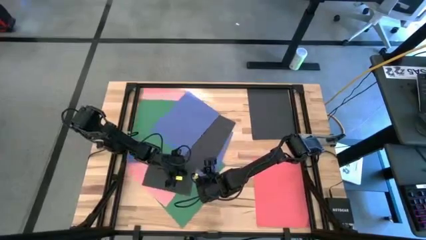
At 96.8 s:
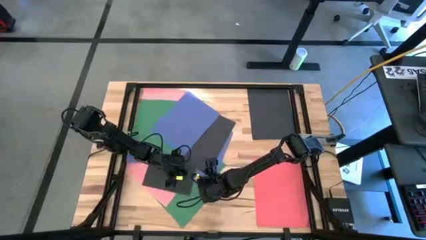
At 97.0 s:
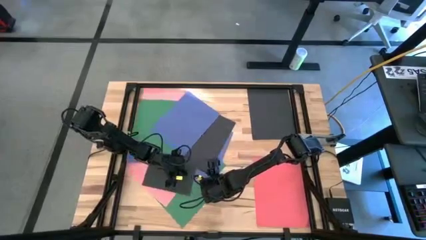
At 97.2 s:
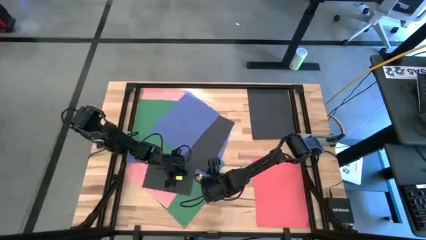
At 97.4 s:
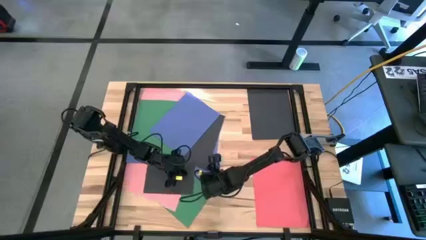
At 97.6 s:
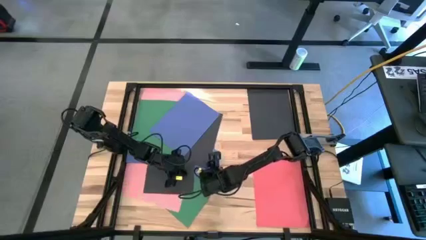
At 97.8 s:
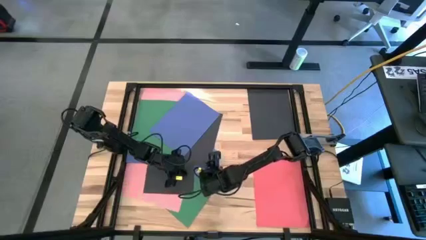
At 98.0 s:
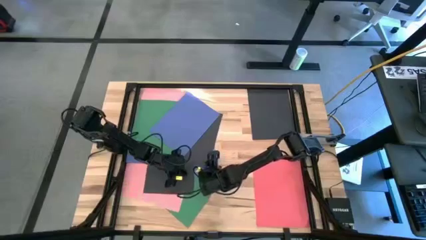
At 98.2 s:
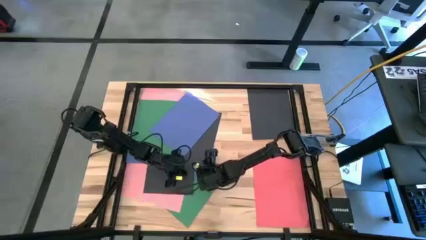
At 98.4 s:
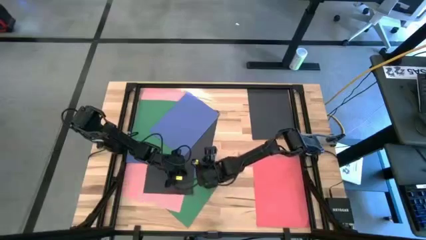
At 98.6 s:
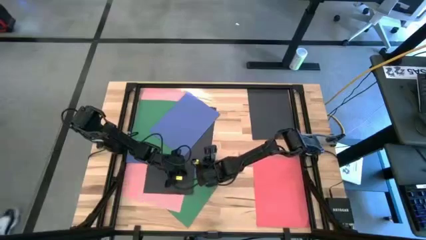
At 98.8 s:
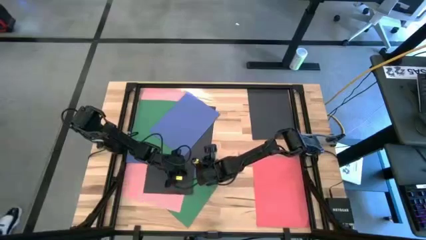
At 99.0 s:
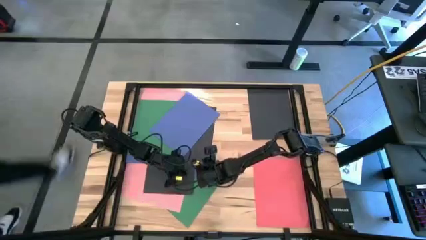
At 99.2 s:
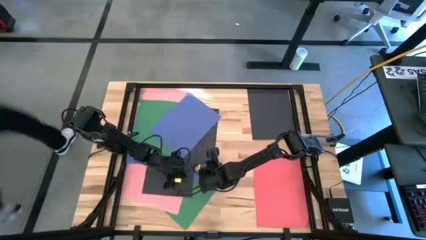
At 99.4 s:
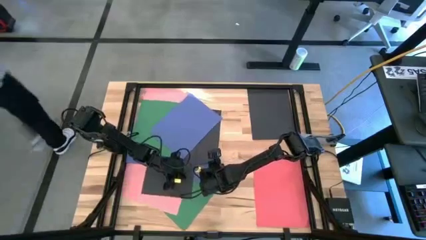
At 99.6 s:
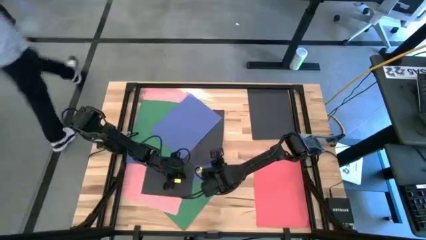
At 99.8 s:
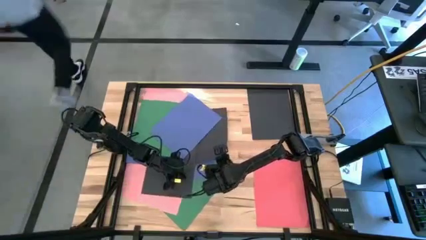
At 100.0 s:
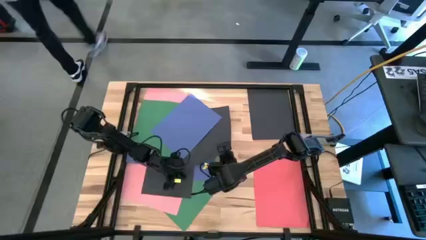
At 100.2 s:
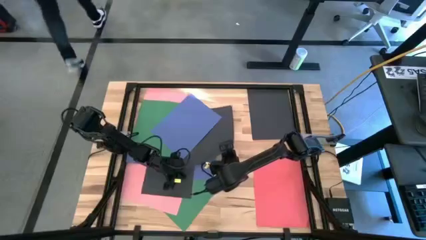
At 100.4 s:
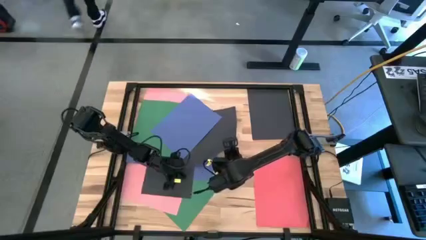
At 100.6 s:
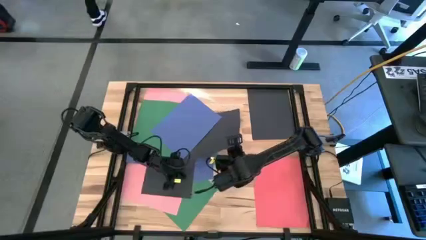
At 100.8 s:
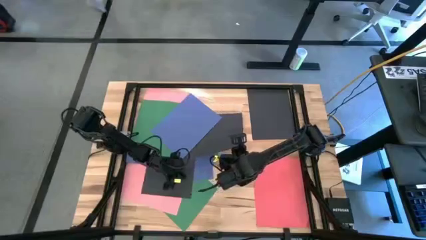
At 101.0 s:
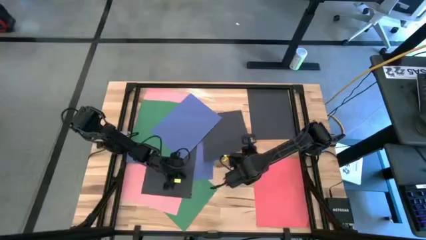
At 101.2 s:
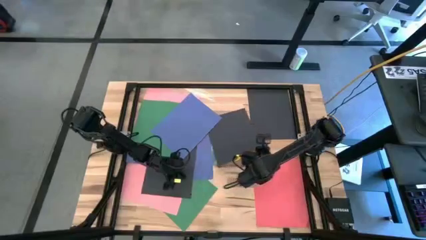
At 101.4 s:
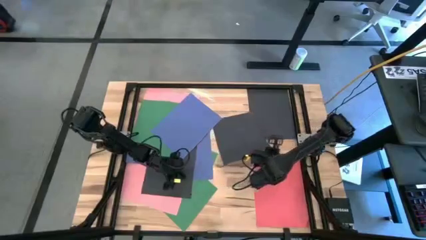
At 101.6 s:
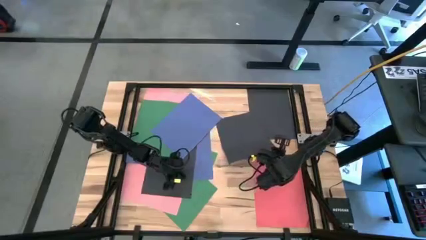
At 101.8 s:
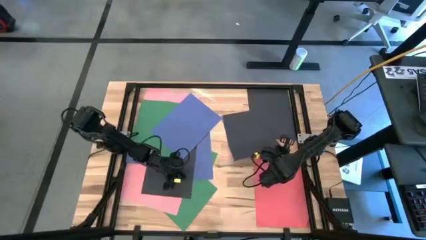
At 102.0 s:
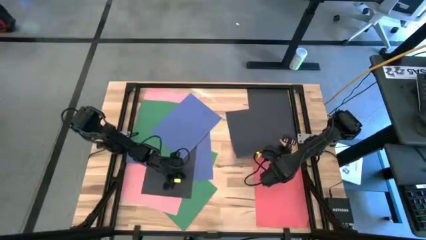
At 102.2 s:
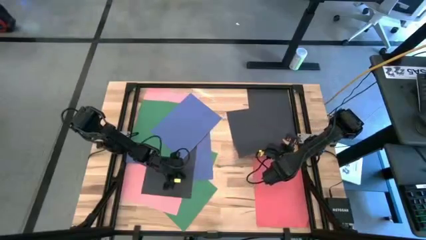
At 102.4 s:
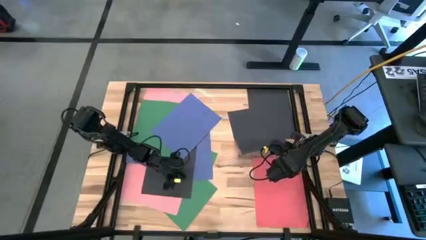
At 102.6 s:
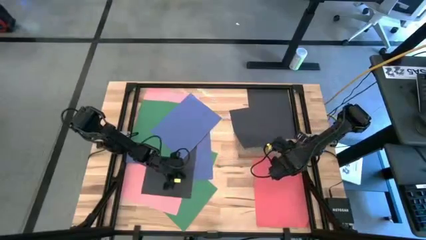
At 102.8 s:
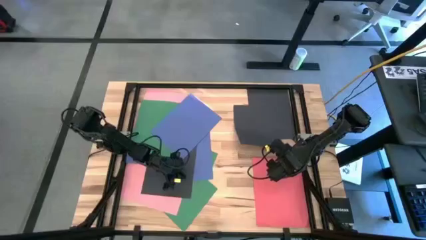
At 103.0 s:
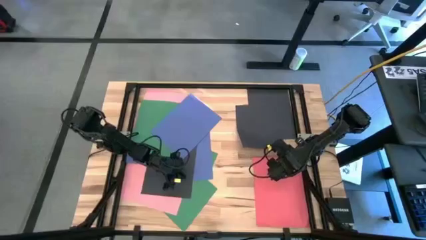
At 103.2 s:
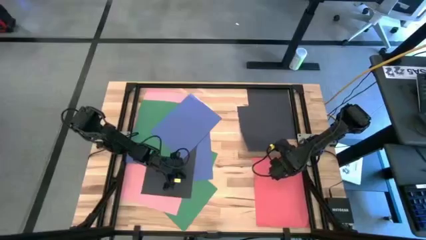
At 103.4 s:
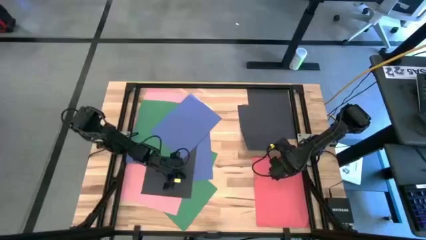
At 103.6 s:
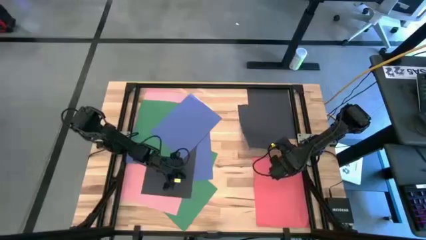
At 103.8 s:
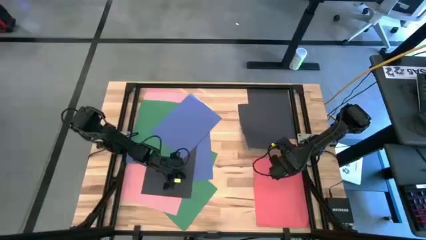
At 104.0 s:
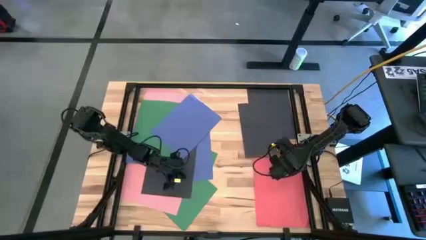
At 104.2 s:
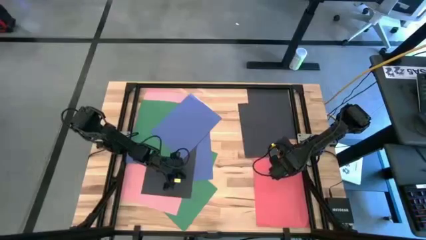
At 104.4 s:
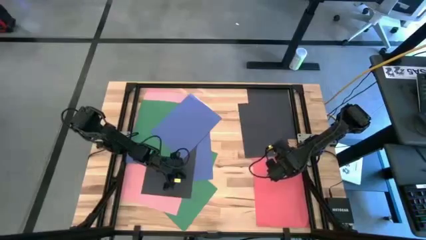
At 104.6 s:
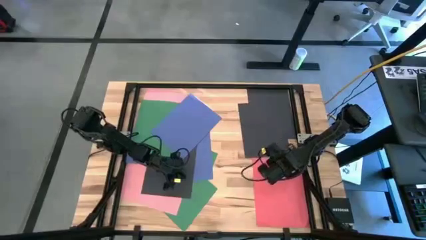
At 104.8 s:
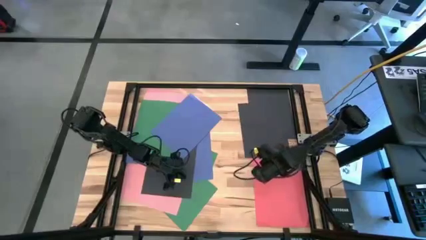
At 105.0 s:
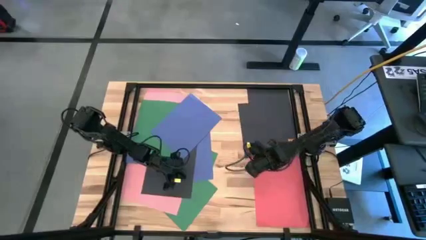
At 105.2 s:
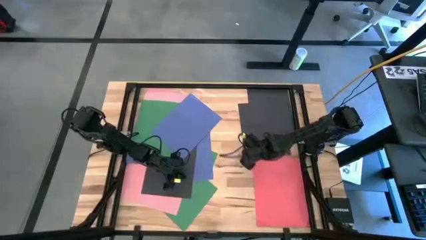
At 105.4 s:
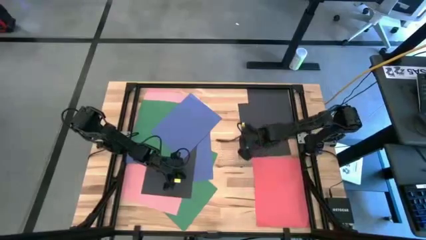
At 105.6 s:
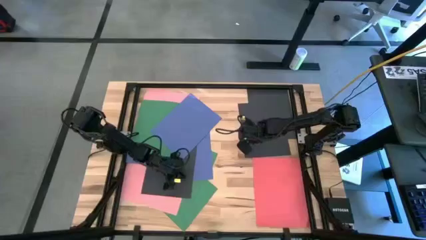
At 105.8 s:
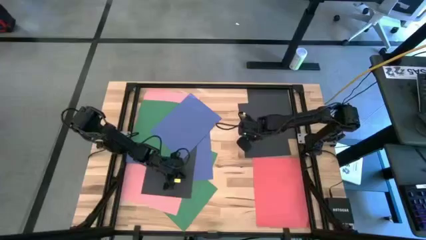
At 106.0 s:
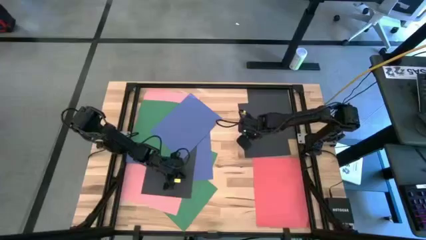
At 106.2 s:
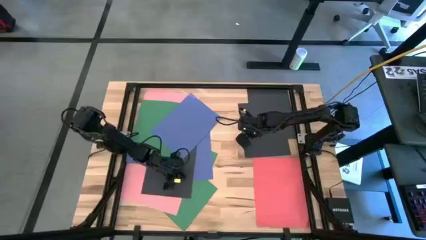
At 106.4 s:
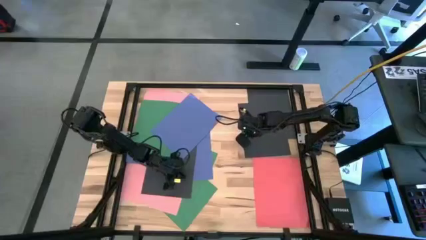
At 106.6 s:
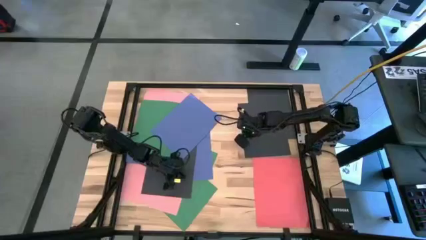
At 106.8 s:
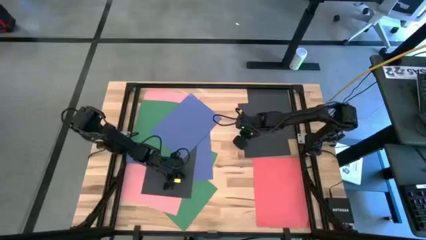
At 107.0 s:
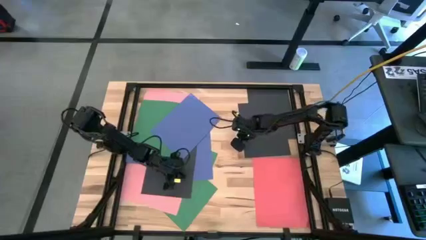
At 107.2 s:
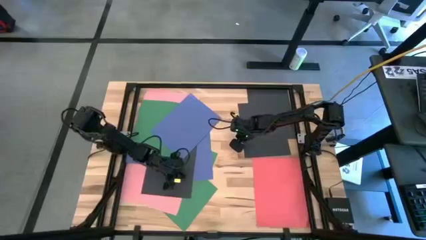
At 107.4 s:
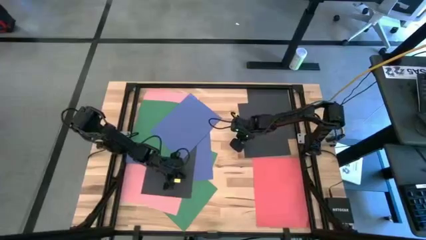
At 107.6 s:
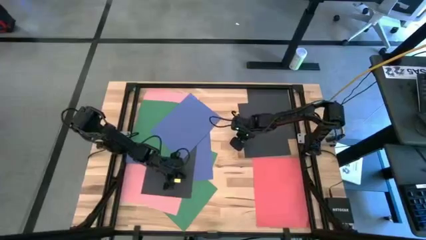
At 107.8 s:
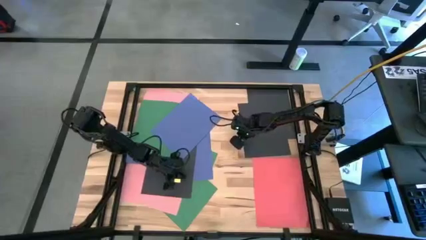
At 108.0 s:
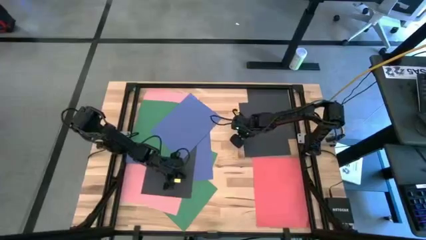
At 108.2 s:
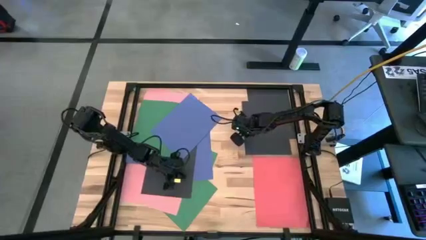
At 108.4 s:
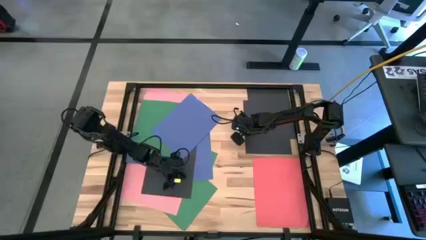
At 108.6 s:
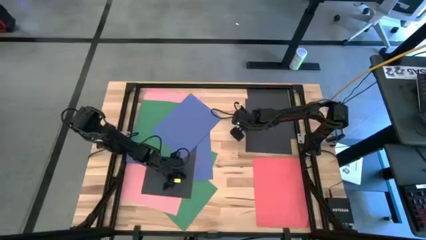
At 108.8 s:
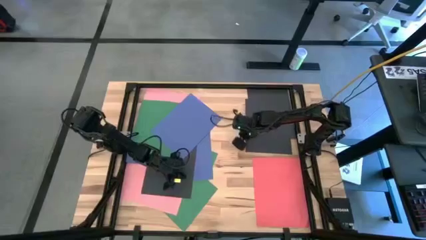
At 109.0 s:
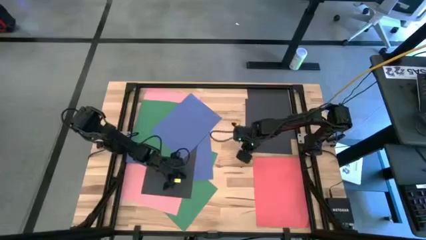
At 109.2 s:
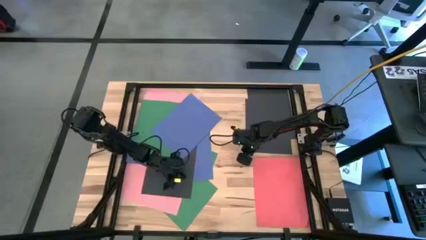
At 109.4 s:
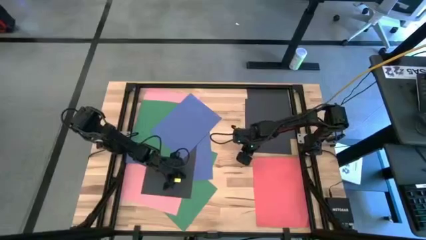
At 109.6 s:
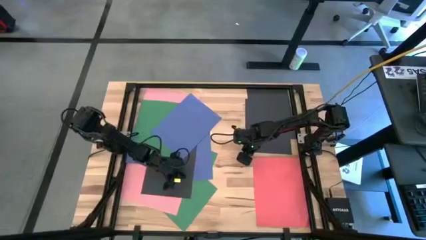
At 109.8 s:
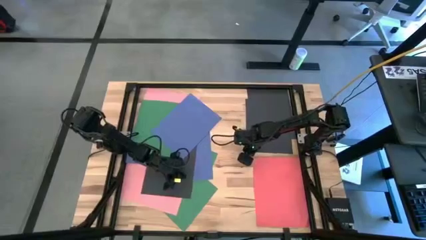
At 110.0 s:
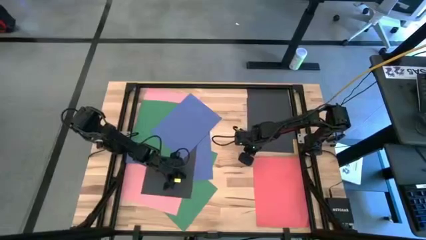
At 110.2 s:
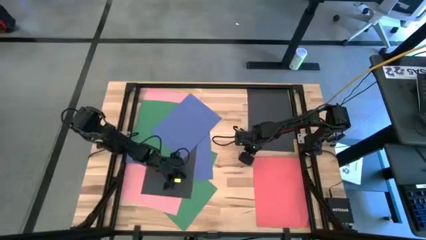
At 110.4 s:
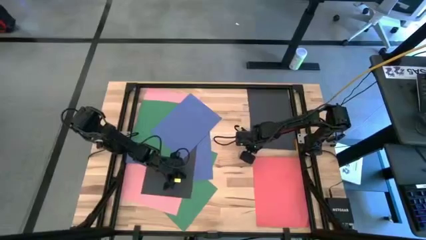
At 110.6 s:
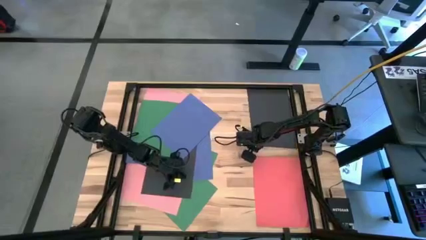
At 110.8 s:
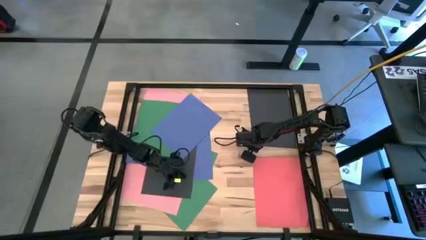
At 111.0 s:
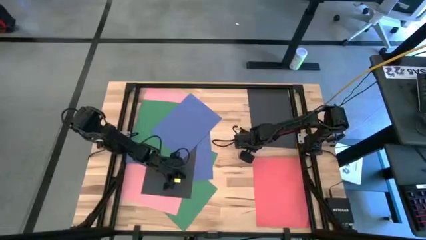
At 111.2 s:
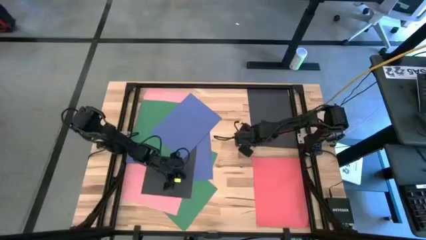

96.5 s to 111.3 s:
Task: Organize paper
Stack the black paper on top of the other black paper on the table

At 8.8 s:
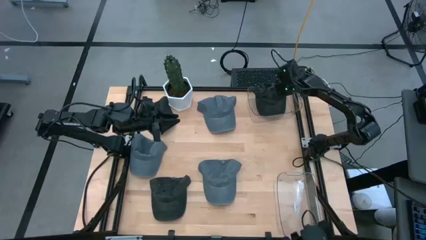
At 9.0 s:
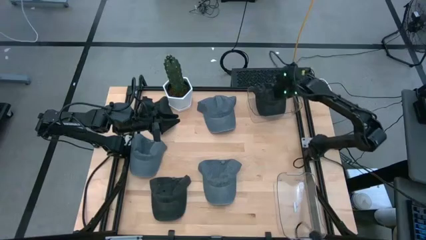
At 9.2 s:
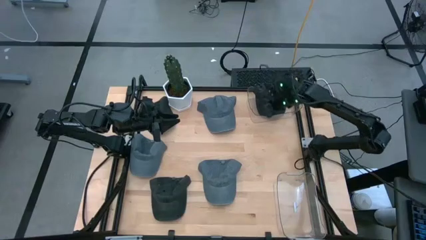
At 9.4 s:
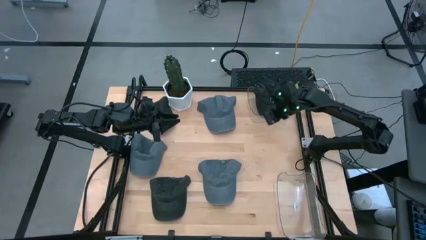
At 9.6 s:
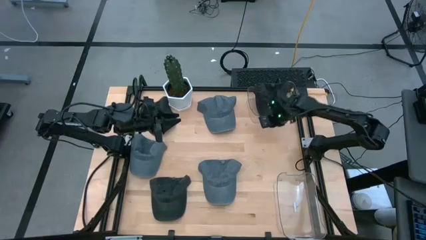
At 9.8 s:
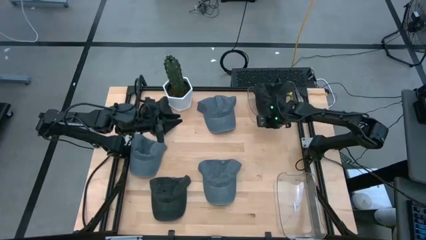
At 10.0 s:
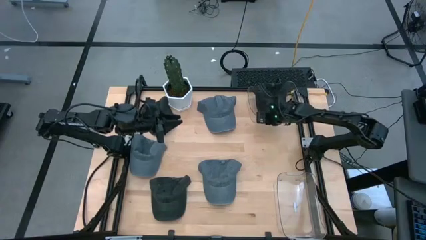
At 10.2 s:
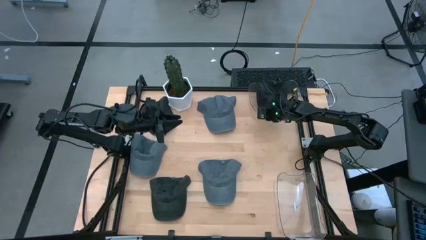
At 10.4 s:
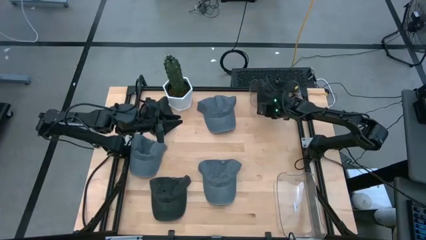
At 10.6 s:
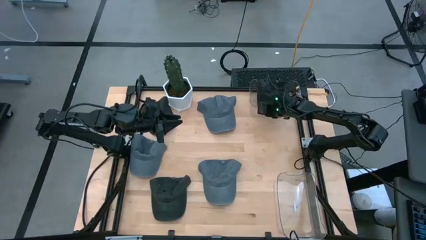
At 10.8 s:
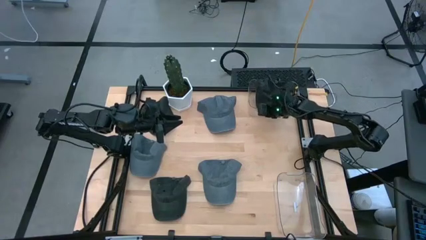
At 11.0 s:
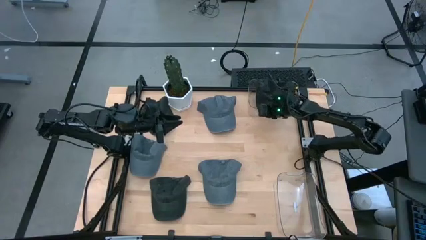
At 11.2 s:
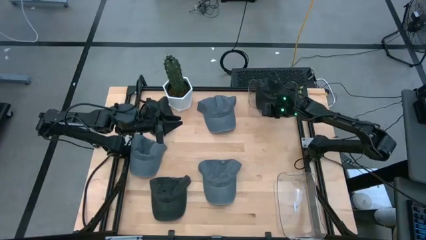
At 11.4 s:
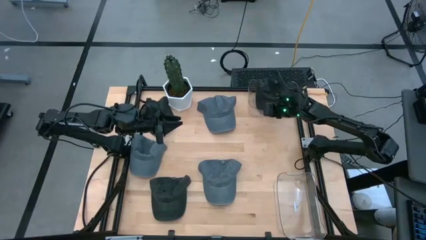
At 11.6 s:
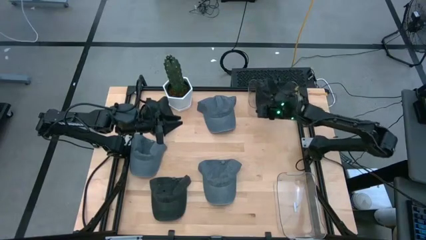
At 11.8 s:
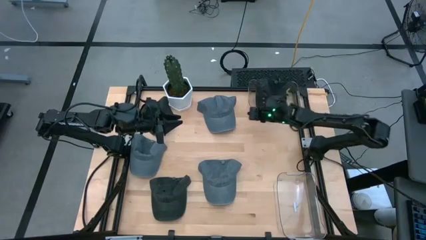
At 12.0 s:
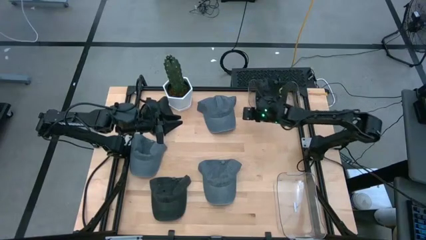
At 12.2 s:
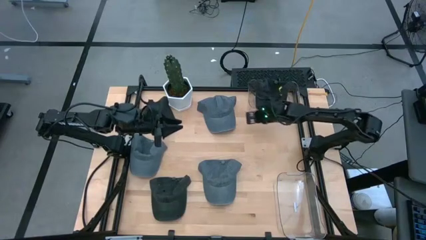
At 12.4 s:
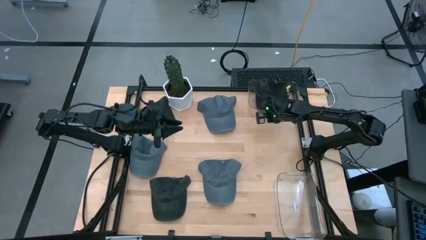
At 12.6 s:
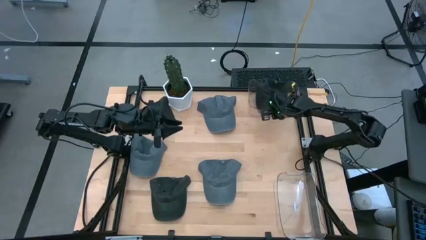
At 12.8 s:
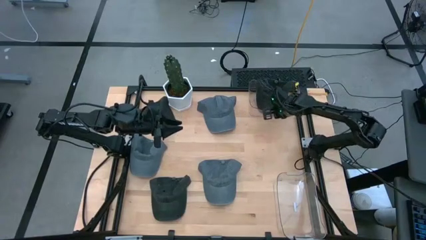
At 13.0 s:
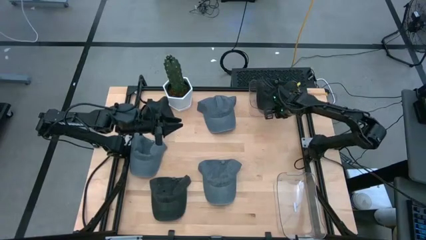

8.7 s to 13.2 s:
Task: Pick & Place hat
Adjust the top transparent bin on the table
